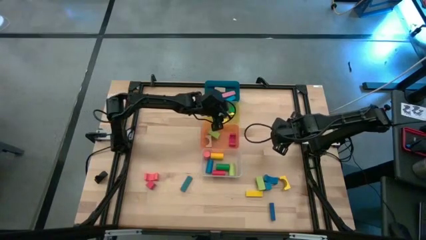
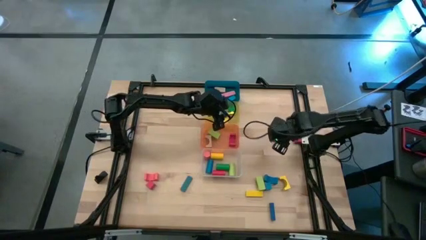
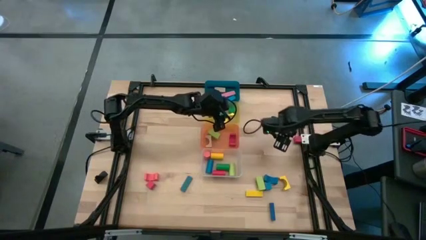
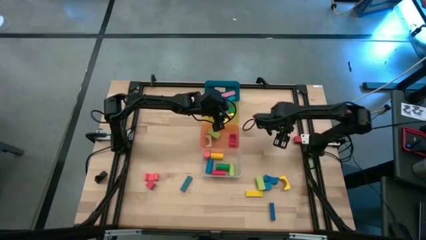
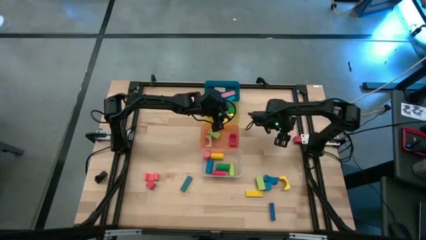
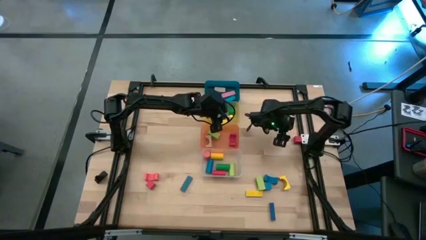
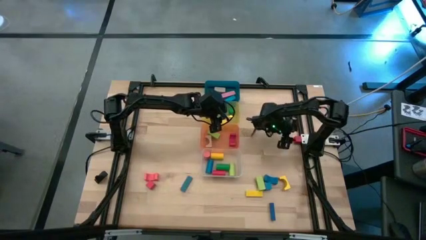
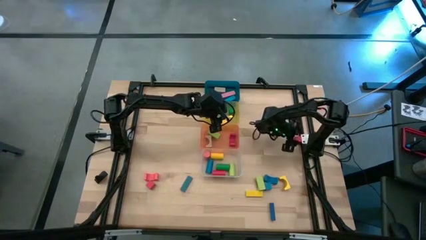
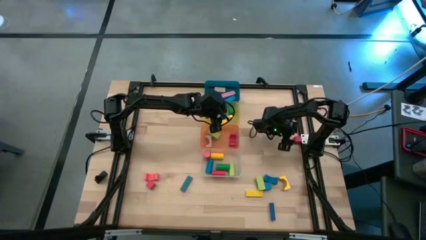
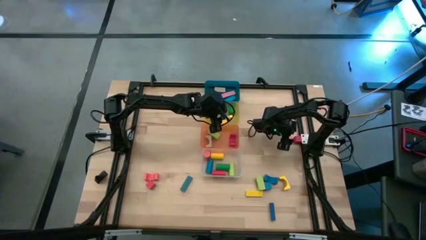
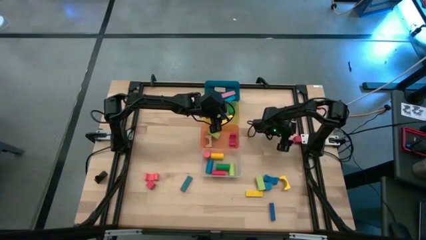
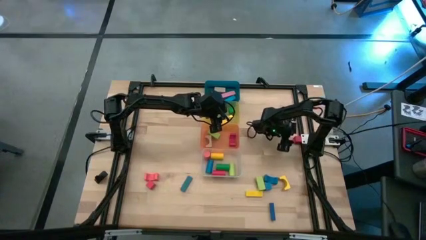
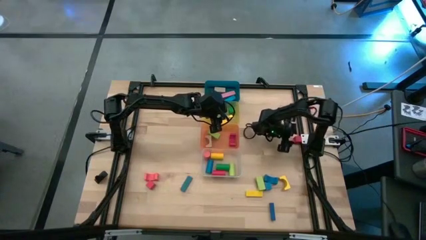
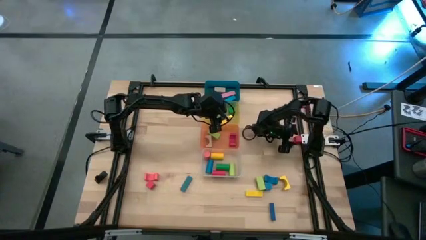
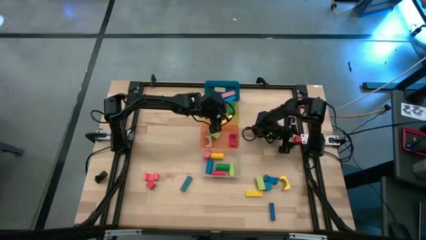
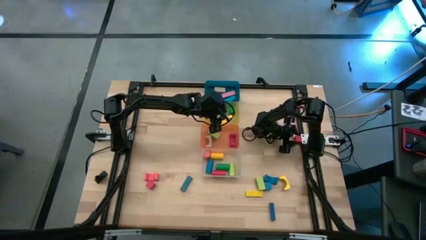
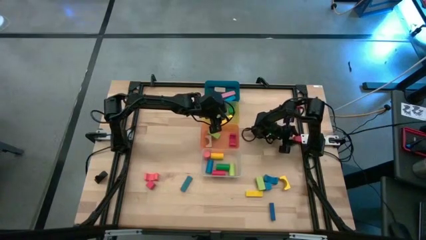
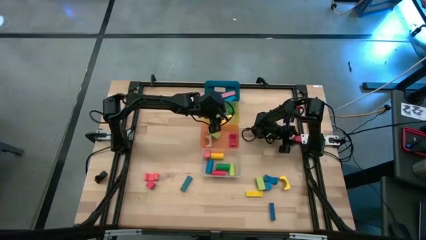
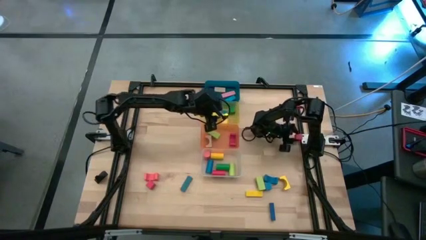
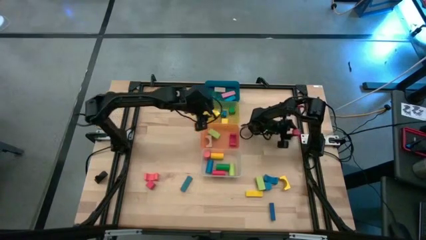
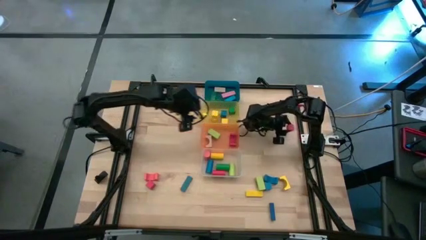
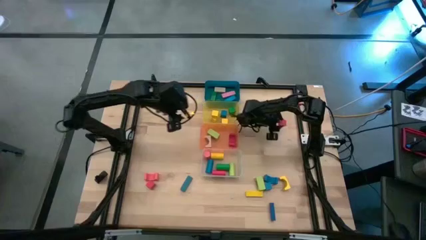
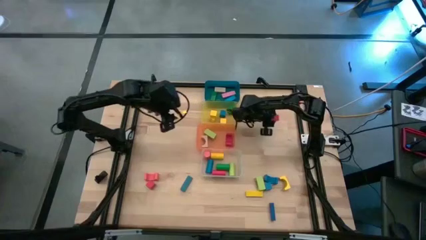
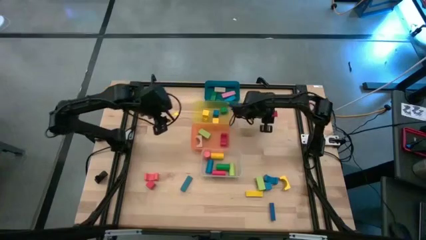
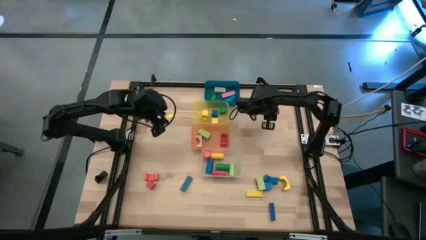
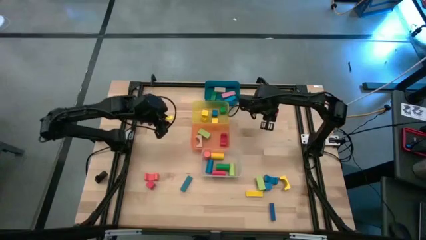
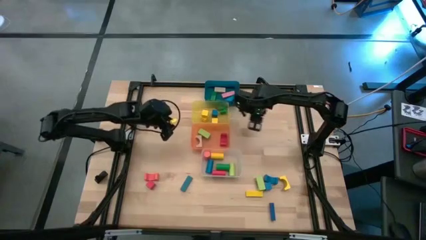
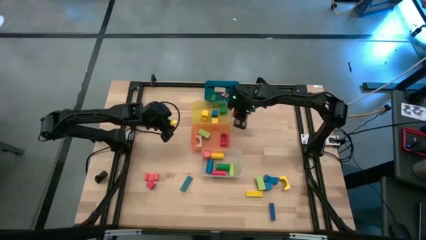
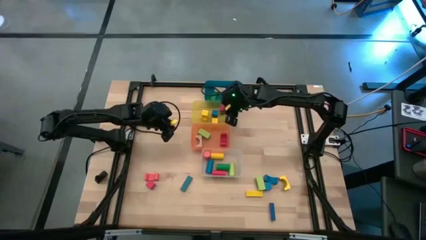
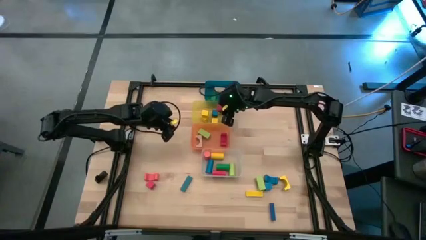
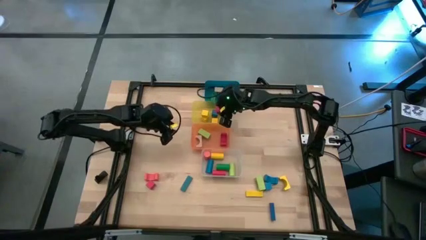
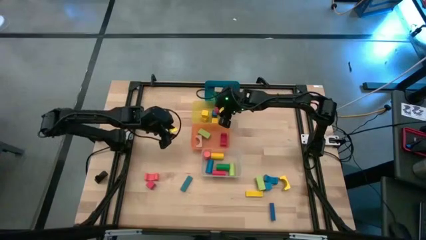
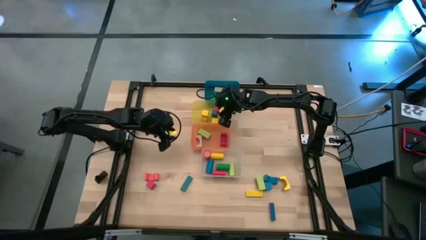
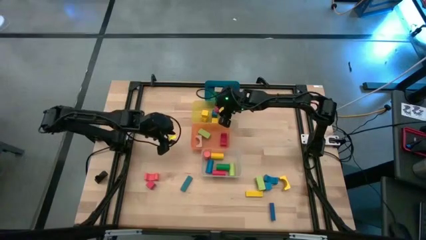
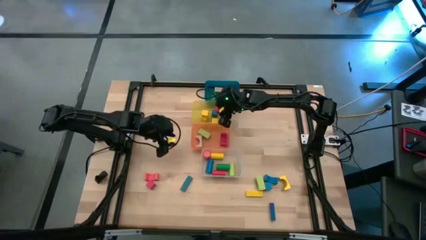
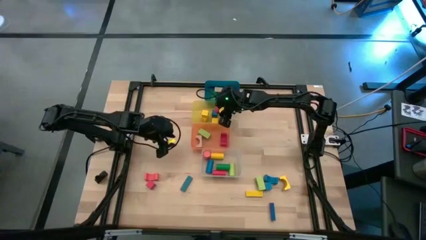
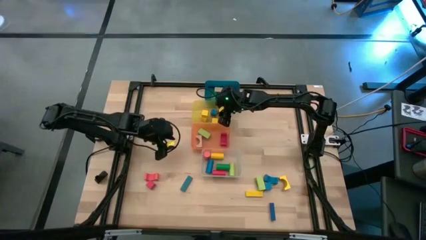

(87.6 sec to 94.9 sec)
Task: Sort blocks by size
Put the red square block into the yellow bin

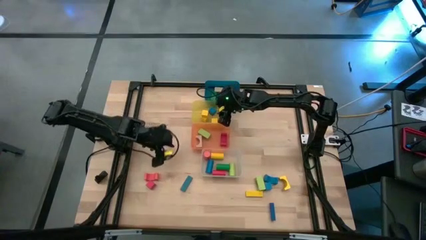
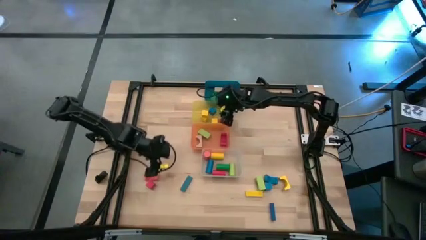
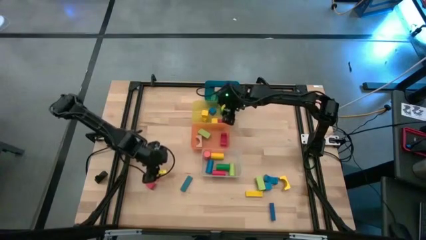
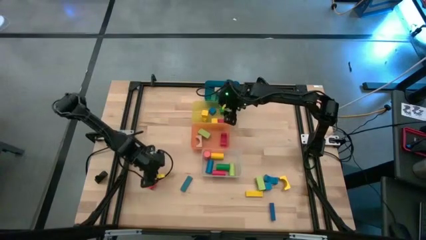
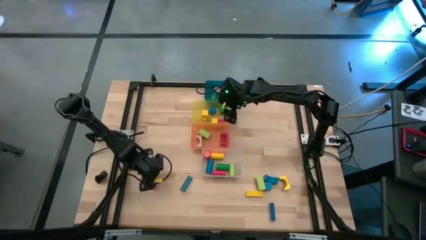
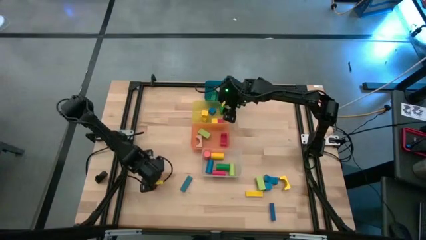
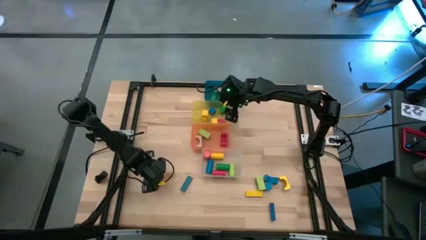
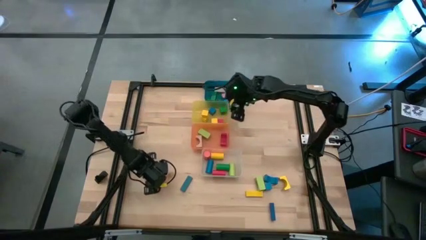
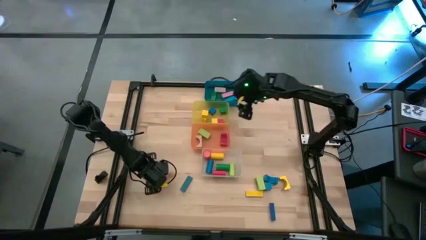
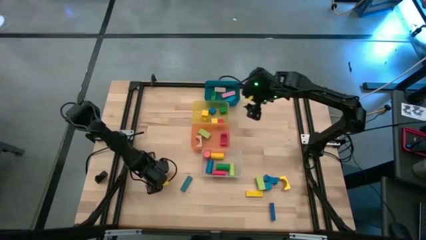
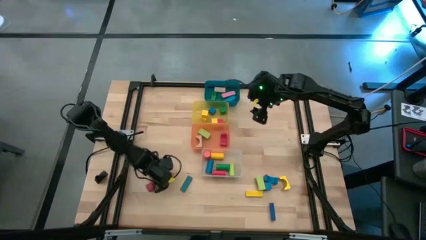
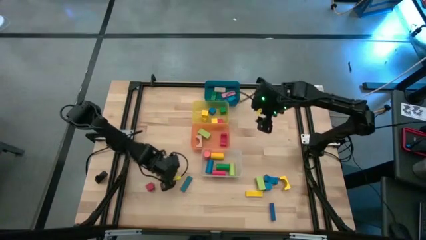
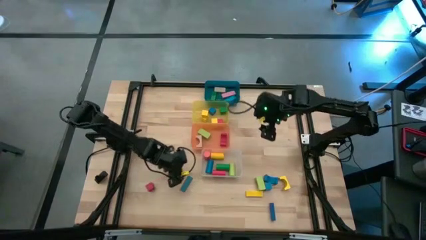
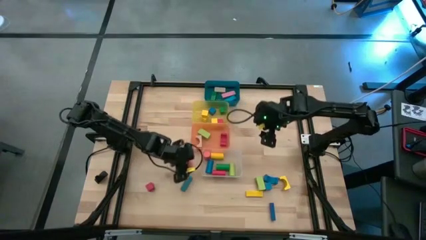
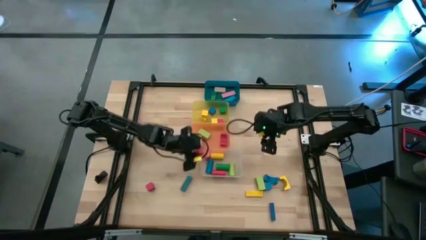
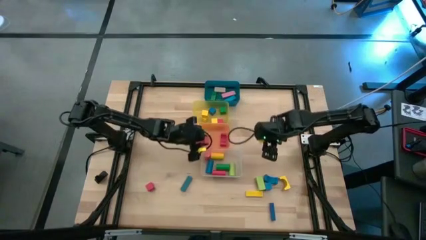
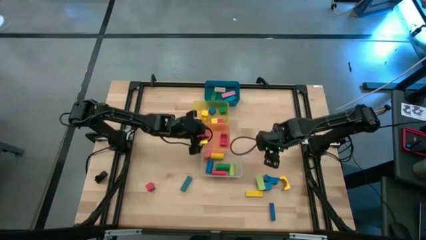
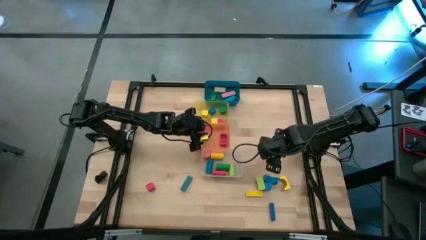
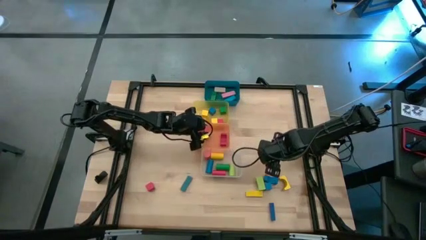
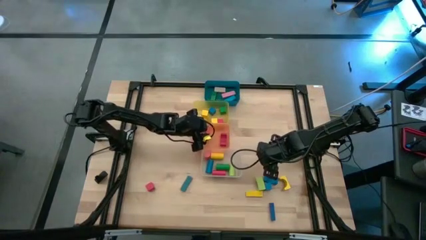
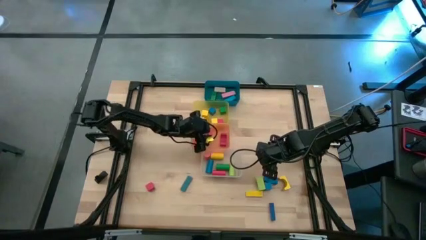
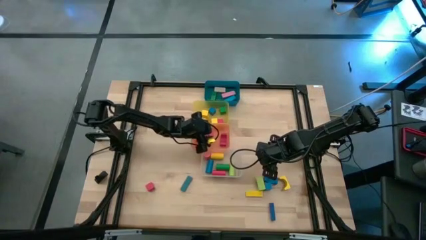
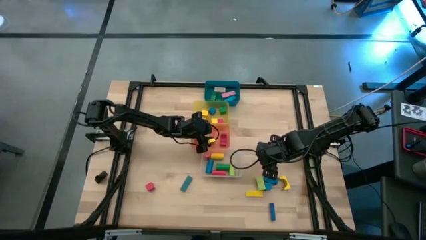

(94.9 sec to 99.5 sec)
Put the orange arch block into the orange bin

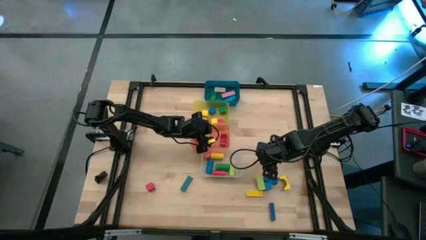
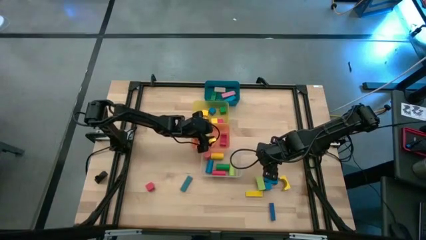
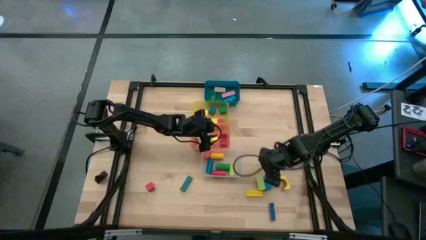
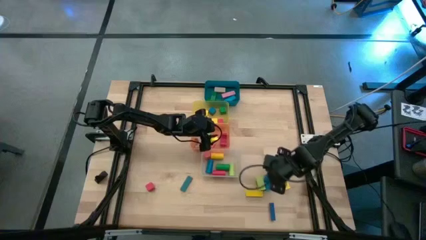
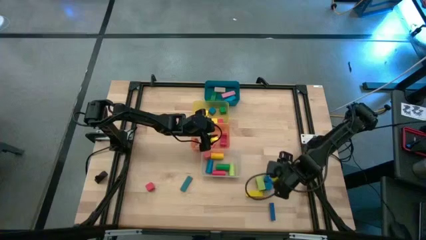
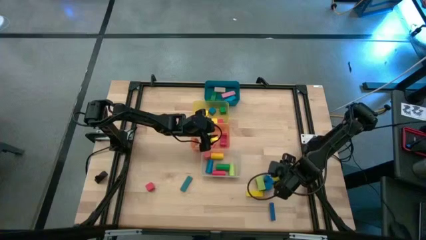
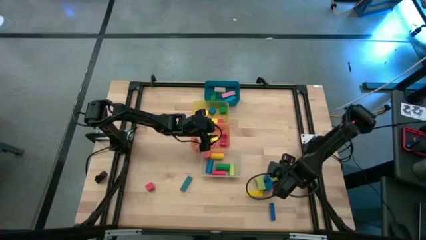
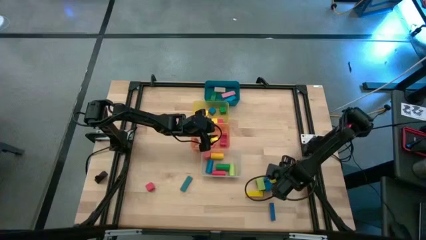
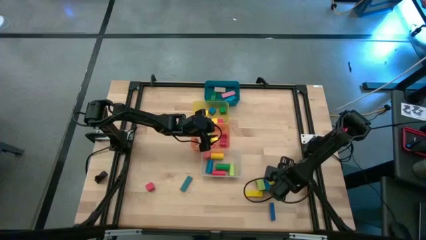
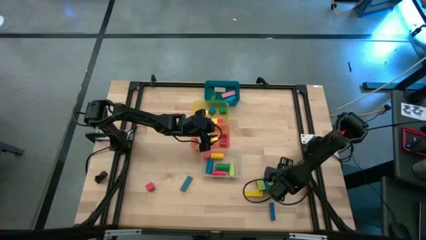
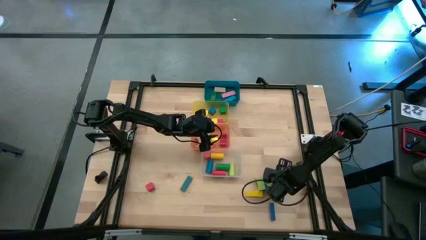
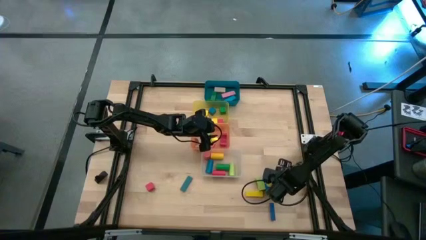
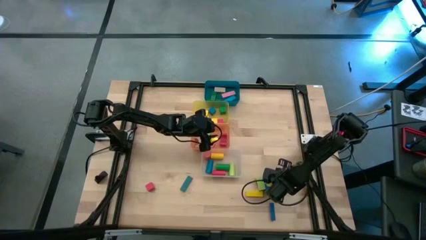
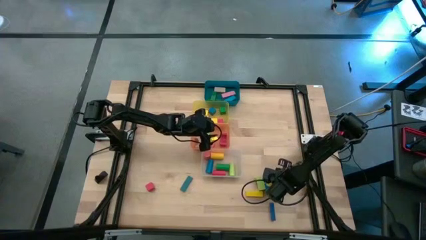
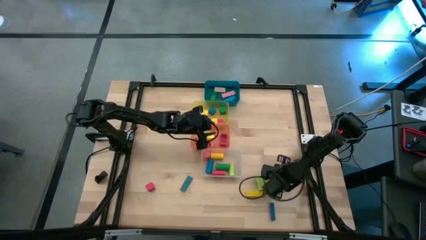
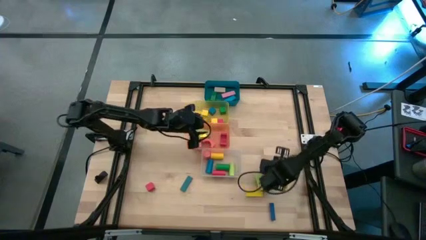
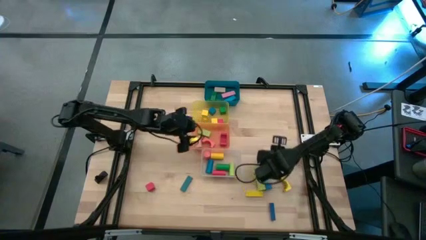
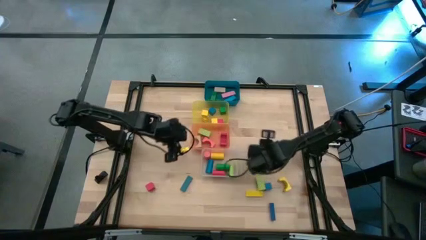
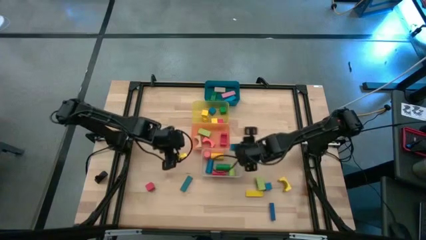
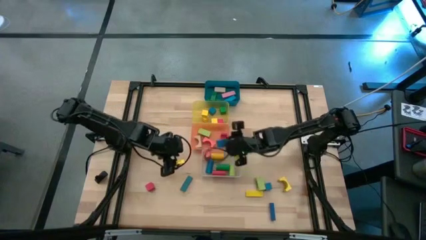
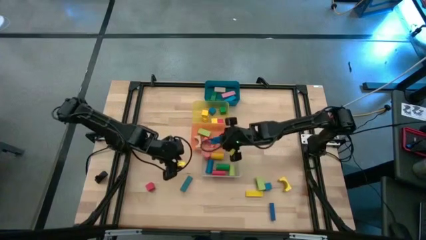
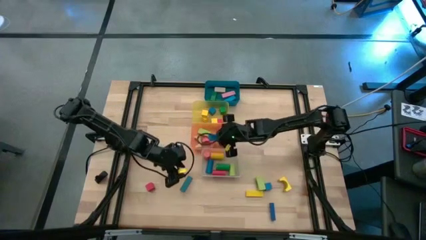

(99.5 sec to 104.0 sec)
Put the blue arch block into the orange bin
